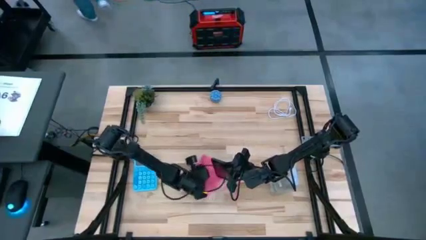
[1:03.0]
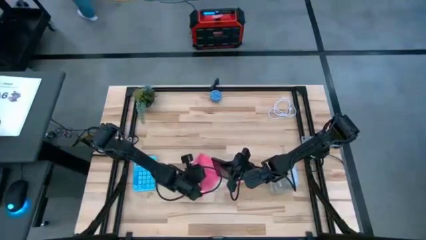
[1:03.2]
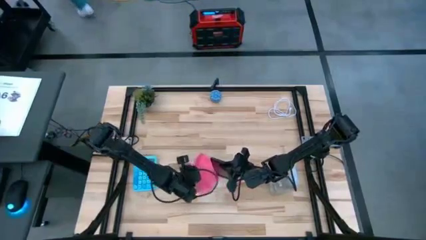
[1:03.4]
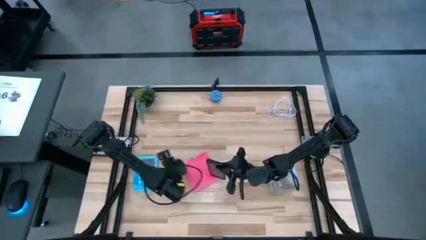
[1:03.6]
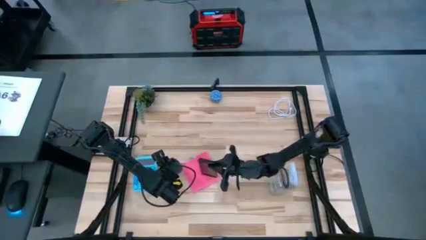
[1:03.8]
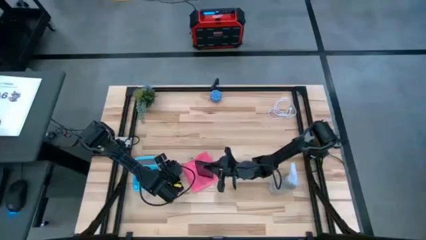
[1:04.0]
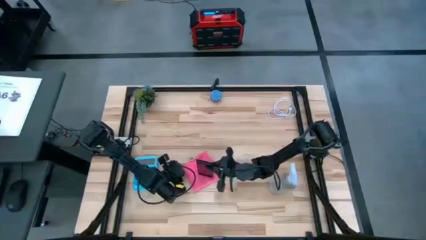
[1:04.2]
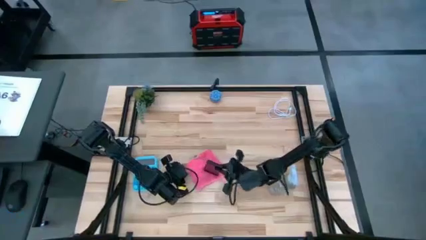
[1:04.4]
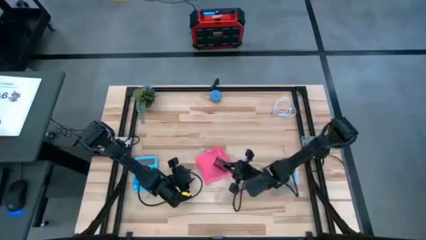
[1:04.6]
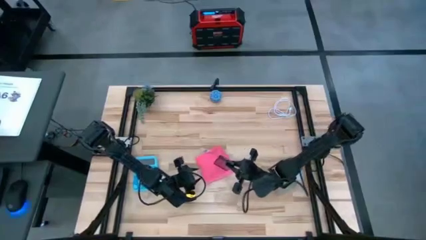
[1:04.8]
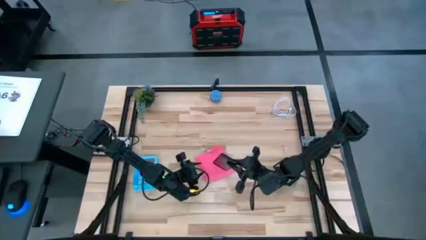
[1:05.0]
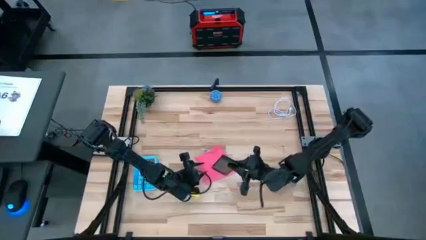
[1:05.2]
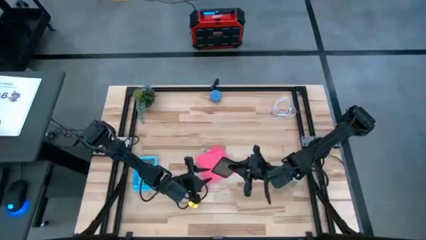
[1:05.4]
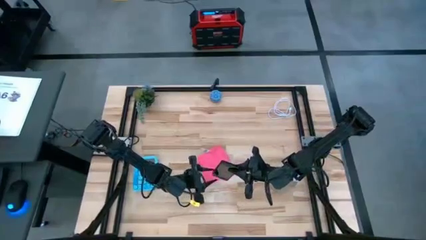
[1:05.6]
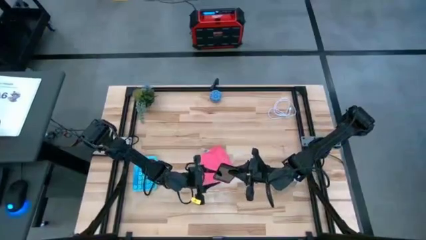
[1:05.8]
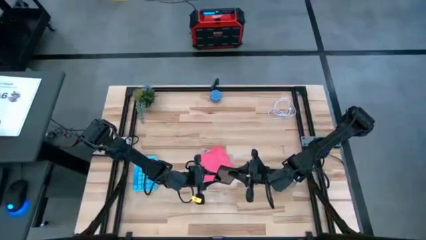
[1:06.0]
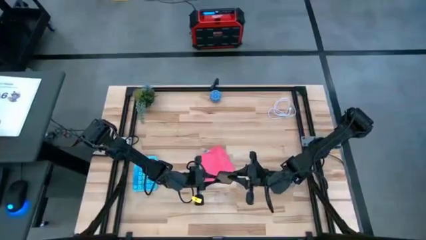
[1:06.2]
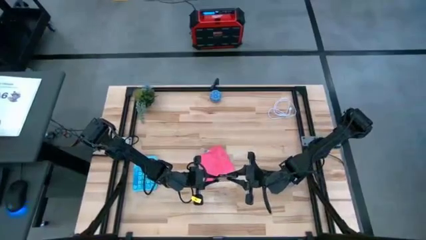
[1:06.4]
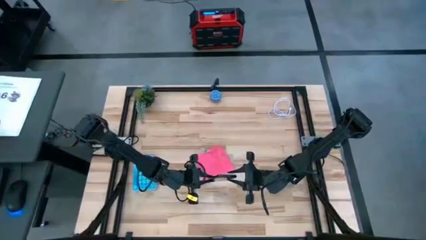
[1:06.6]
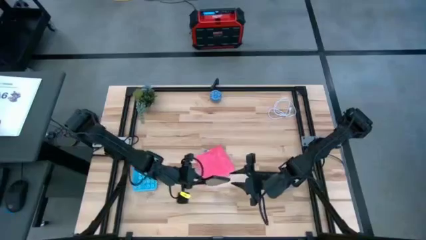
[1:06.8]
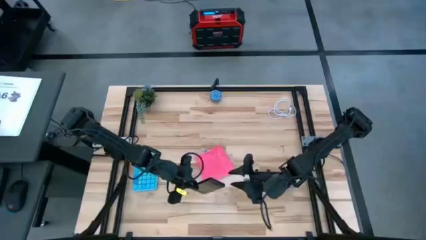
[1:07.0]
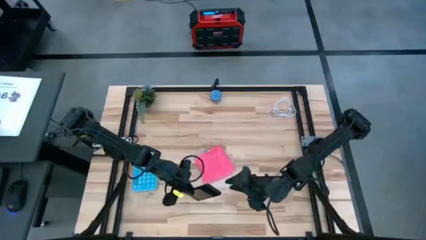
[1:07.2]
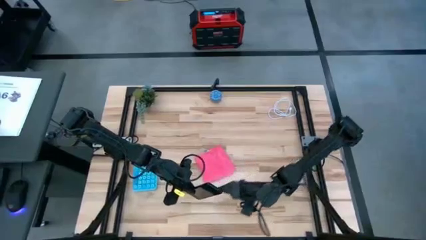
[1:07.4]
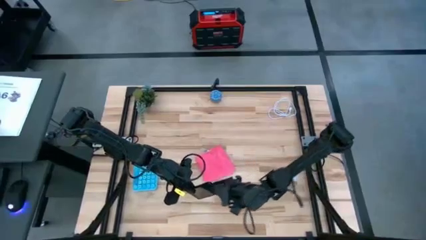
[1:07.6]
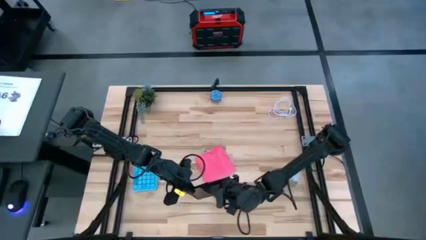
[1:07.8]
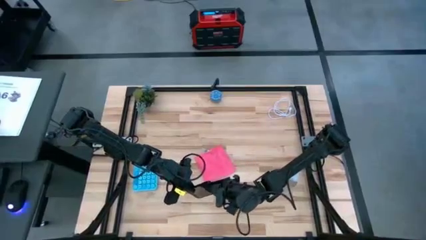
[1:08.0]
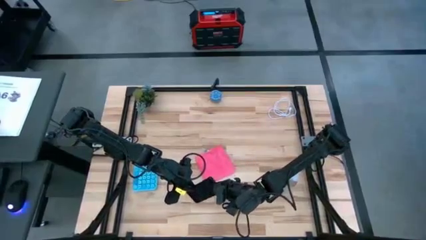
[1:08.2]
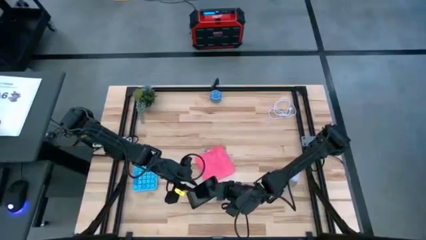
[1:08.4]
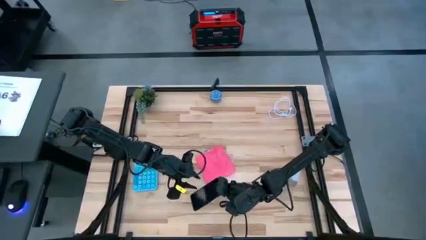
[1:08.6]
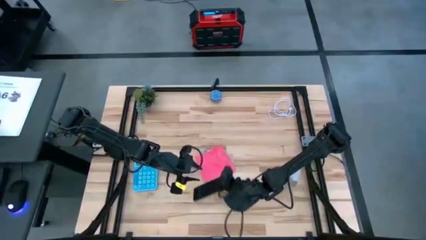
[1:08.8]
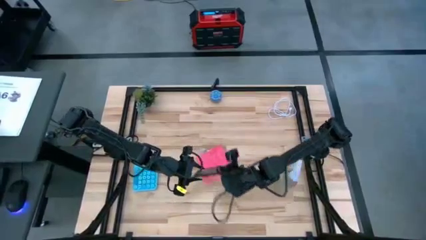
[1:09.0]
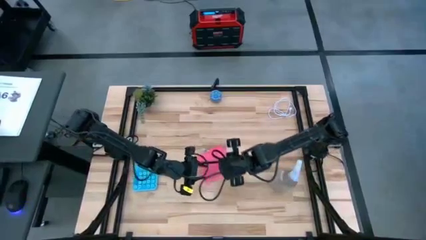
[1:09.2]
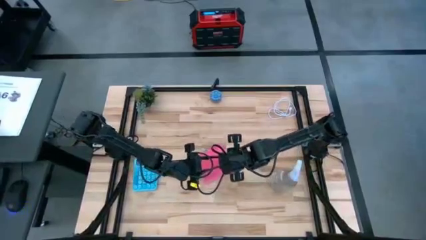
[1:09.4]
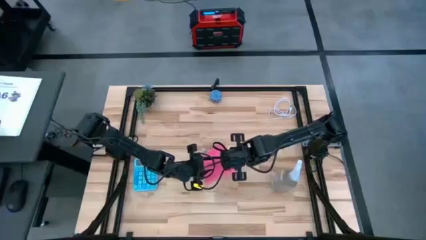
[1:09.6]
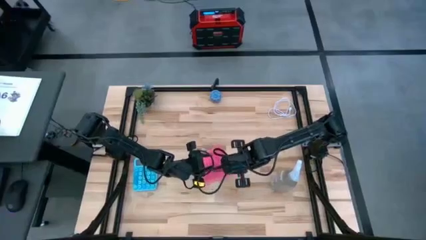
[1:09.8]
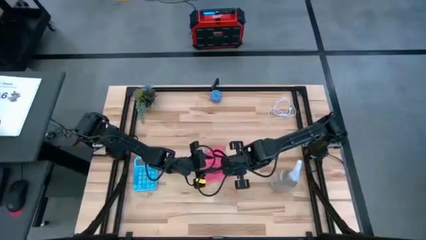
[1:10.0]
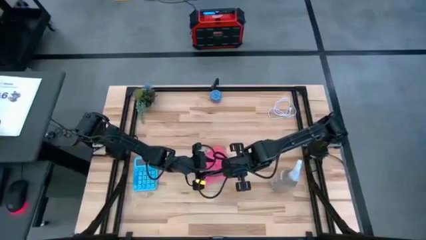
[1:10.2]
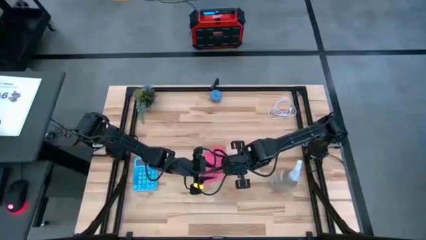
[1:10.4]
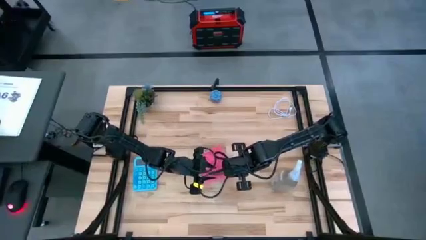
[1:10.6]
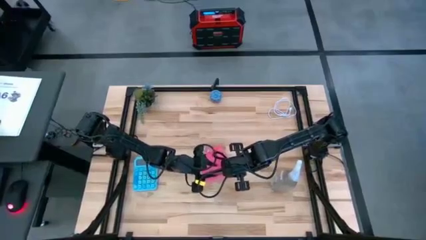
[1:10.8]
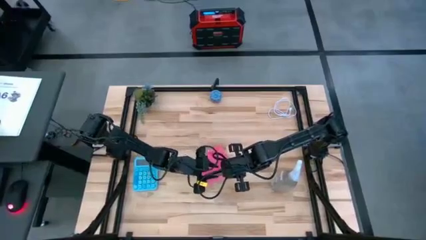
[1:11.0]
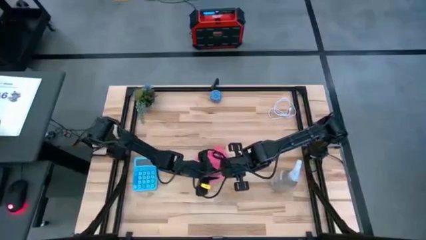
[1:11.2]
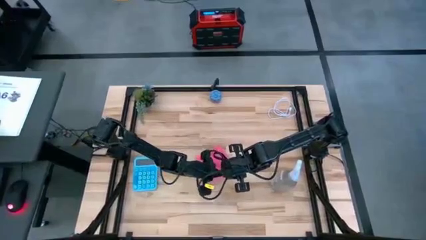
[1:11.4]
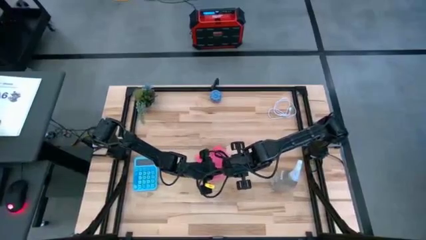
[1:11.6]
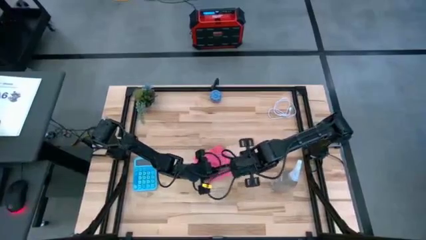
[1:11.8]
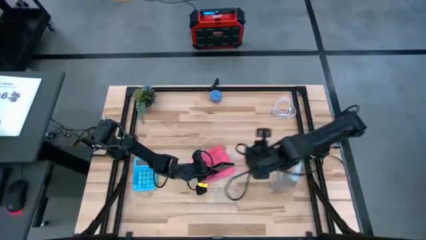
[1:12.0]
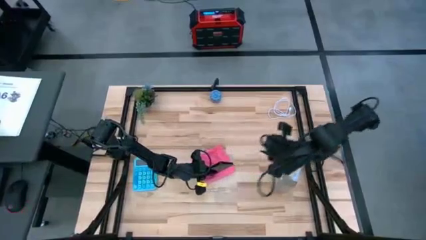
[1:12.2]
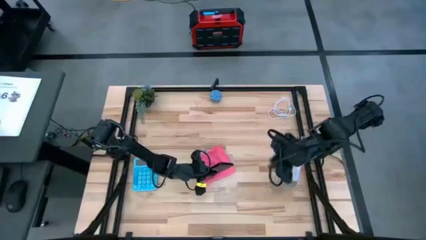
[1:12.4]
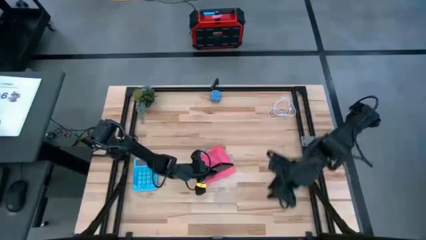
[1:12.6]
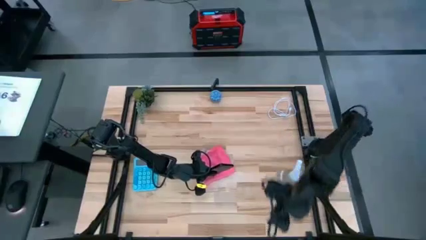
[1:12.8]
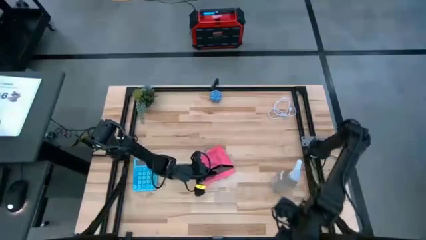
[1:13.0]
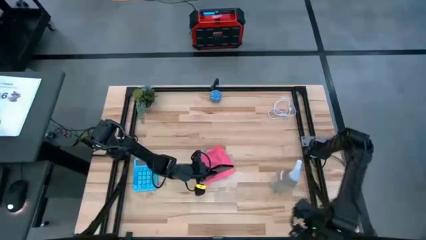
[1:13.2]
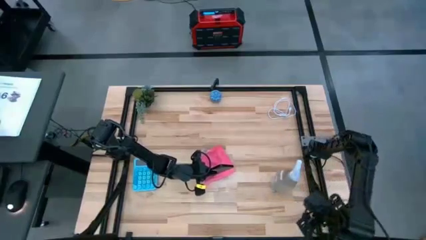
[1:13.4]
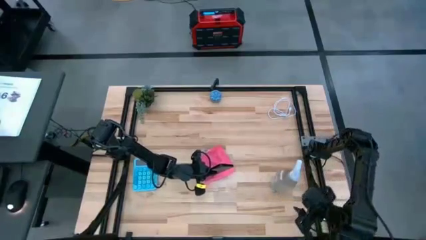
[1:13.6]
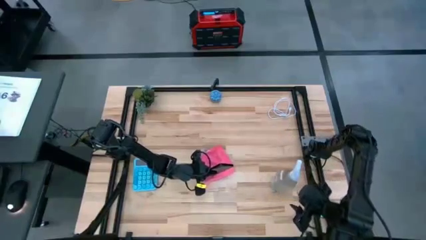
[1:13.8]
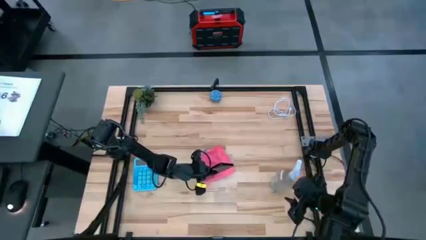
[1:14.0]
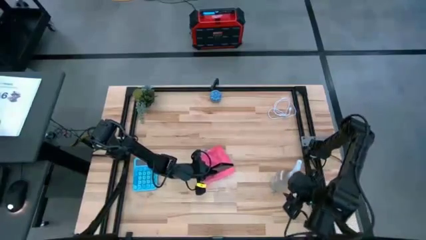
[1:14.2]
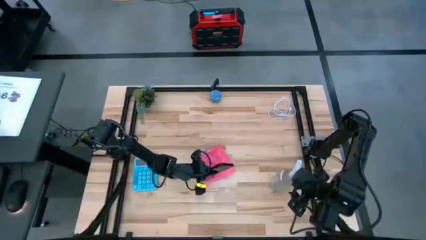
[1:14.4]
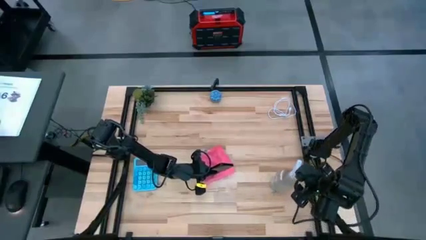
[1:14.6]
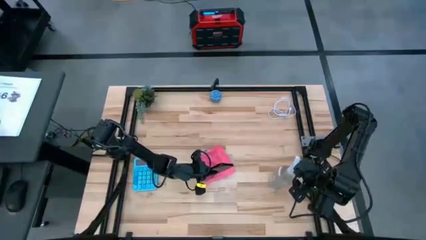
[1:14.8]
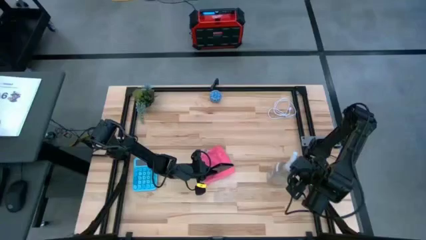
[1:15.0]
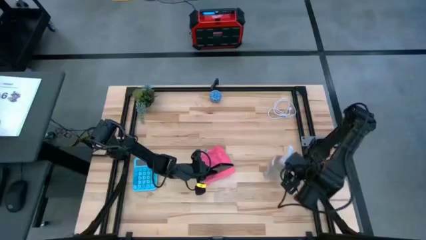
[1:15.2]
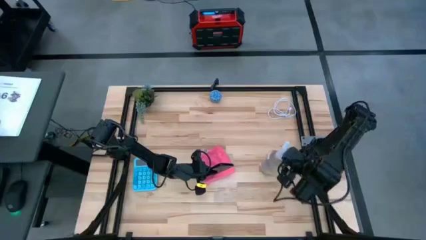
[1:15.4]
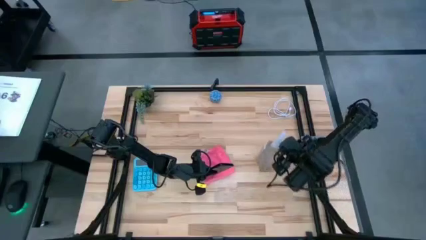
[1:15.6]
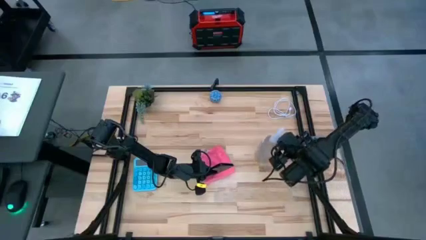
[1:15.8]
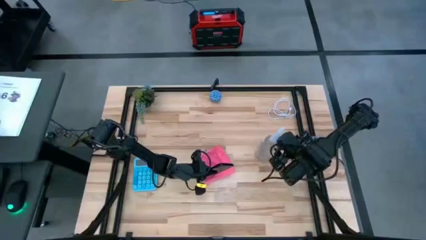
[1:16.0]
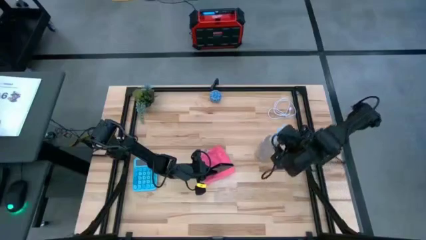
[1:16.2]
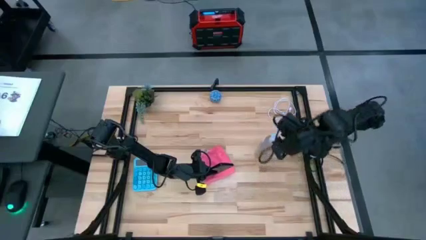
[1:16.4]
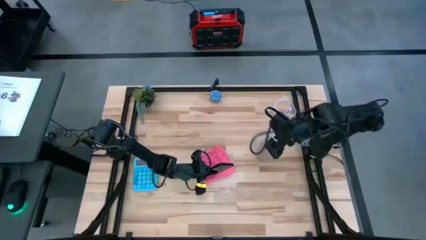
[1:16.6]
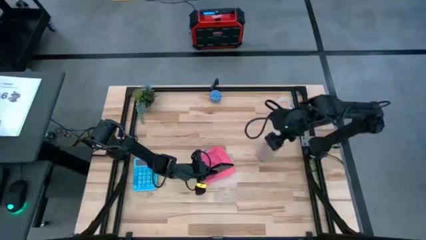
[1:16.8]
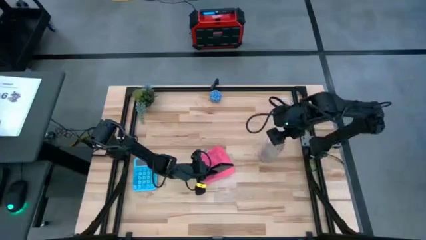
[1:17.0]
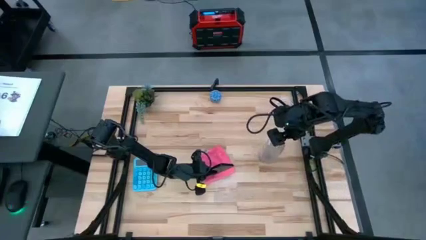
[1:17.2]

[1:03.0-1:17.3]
Task: Apply microfiber cloth
Spray the black cellphone with the transparent spray bottle
